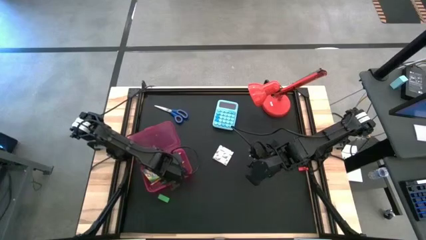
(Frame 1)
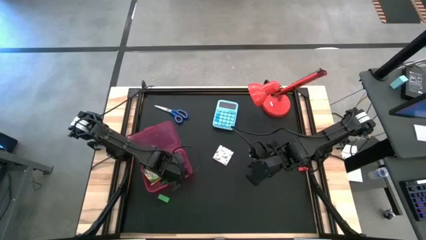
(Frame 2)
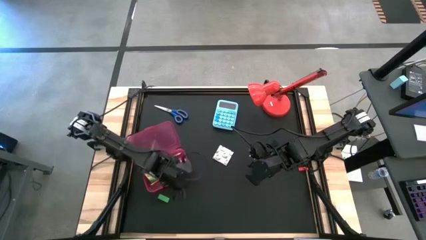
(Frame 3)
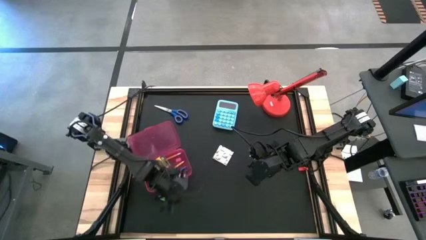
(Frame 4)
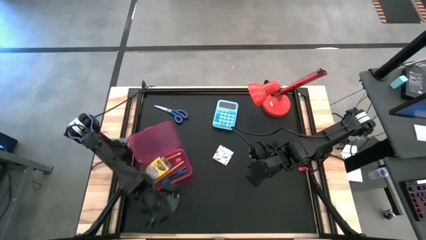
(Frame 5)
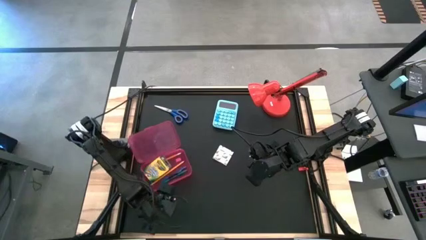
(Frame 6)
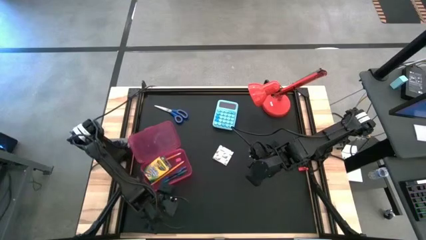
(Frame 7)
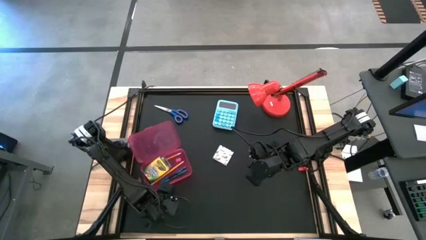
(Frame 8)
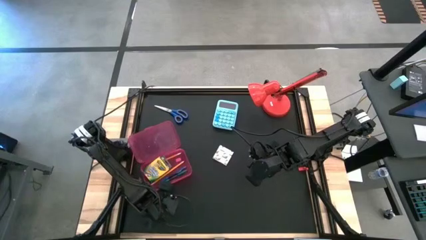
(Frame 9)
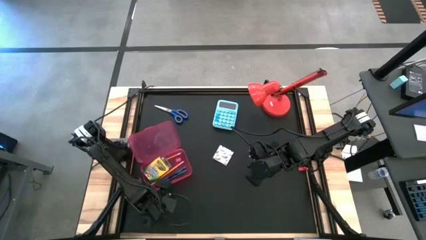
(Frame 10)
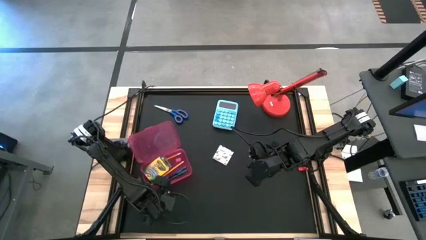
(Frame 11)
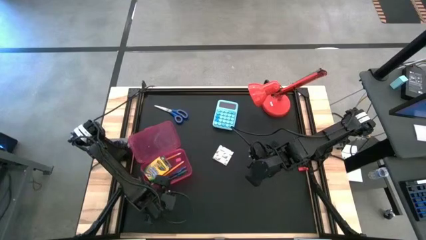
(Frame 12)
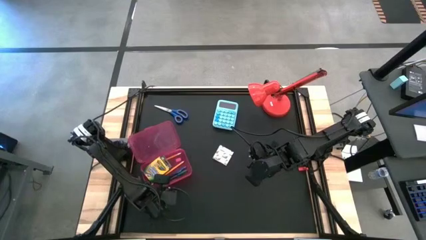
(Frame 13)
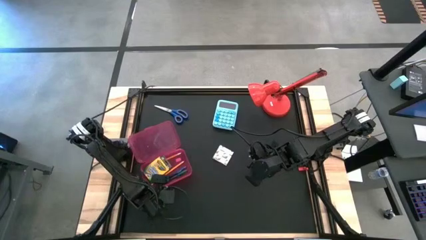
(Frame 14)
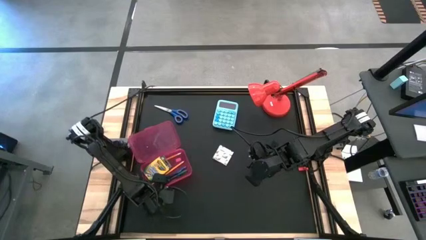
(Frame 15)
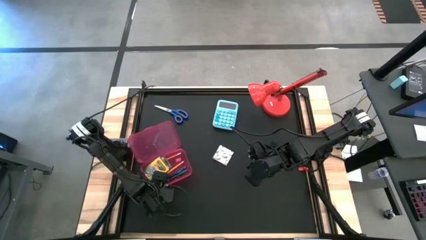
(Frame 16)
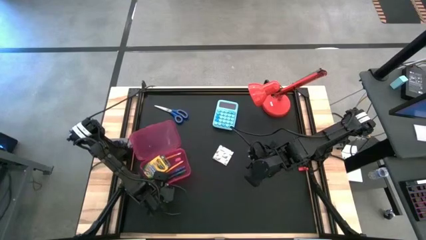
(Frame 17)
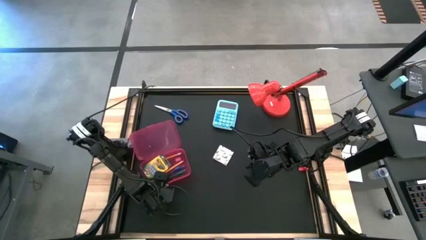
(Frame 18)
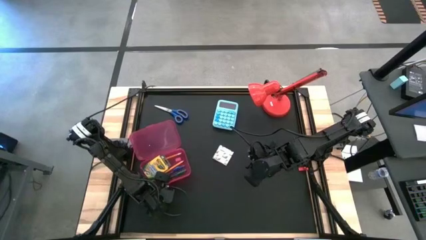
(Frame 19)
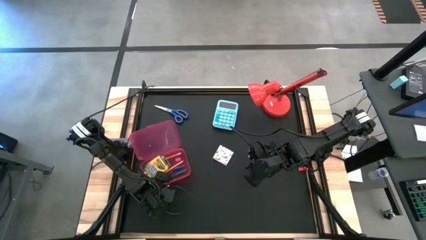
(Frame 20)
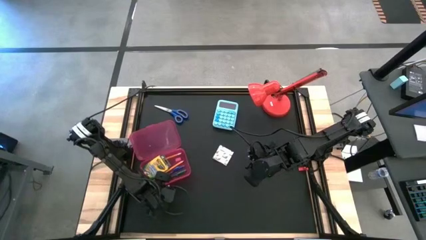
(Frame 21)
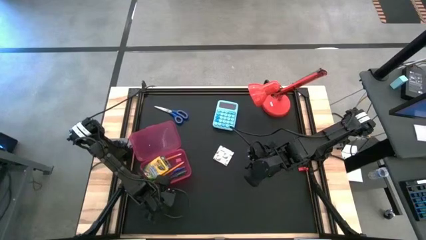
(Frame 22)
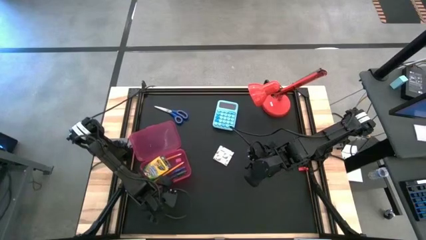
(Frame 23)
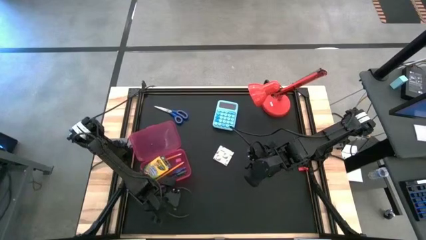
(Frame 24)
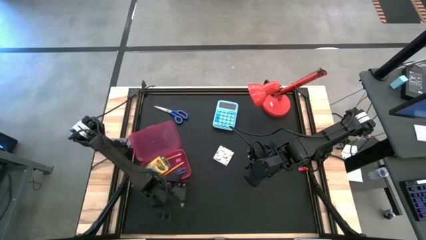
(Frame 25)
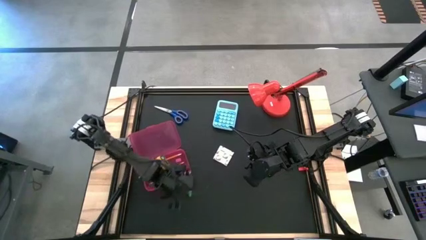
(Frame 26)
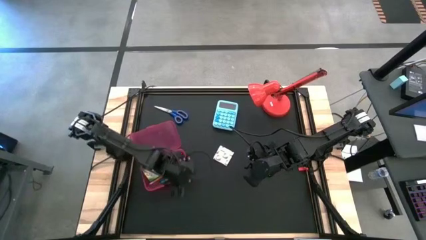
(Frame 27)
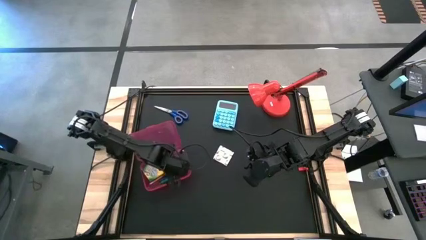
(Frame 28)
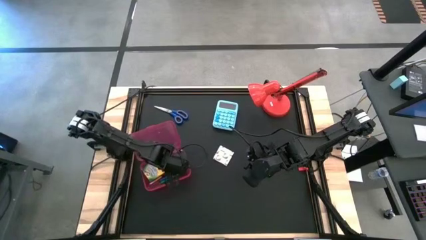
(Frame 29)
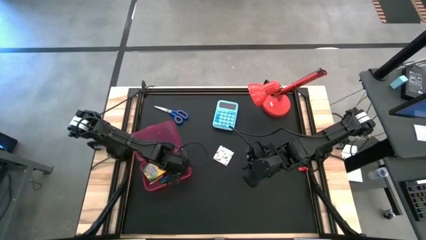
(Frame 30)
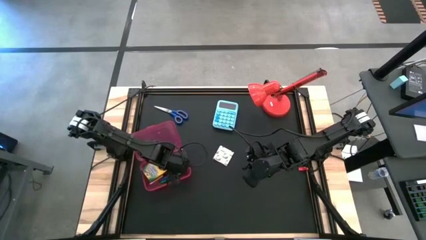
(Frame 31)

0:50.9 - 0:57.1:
Task: Pack school essentials
Put the green eraser into the red supply box

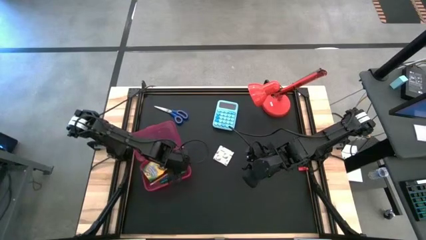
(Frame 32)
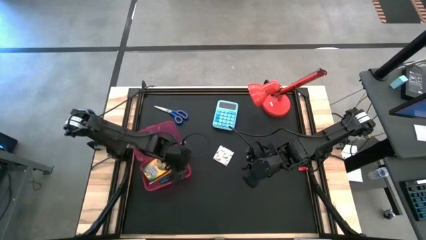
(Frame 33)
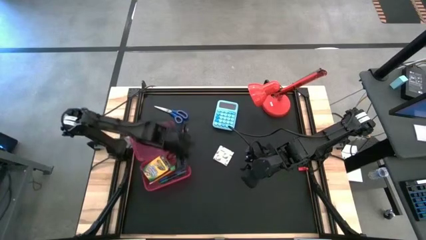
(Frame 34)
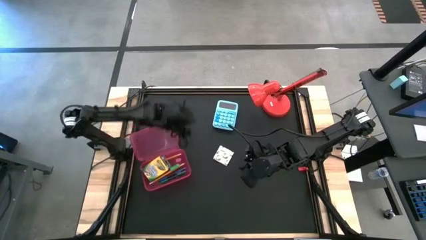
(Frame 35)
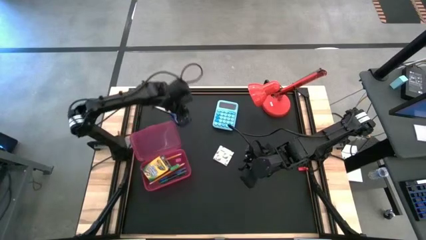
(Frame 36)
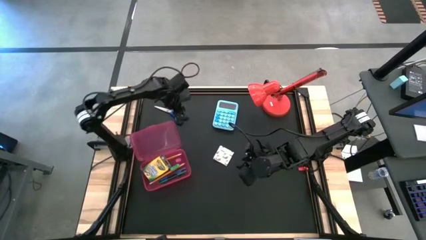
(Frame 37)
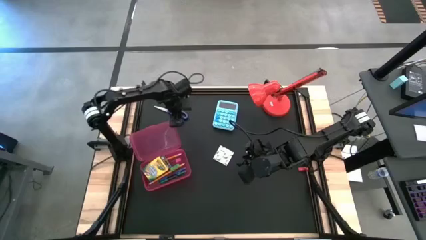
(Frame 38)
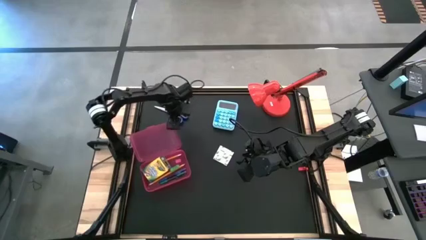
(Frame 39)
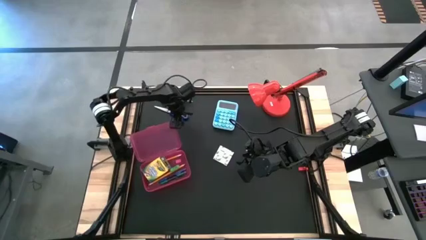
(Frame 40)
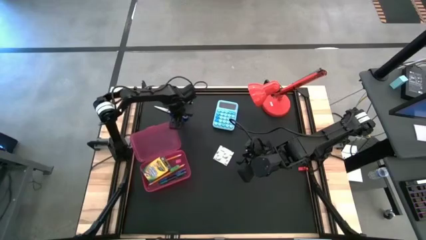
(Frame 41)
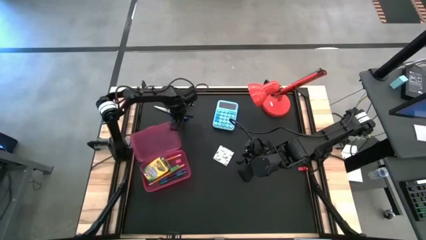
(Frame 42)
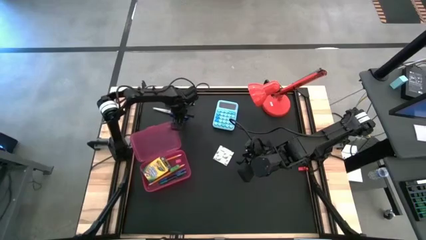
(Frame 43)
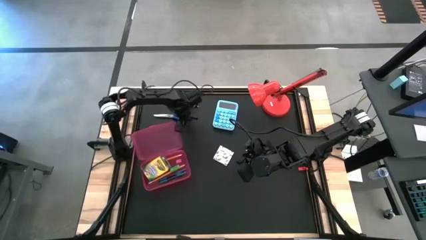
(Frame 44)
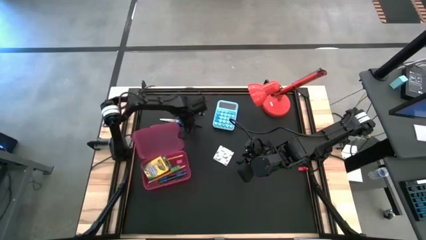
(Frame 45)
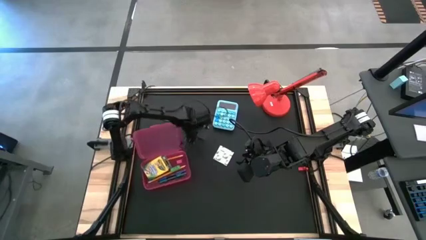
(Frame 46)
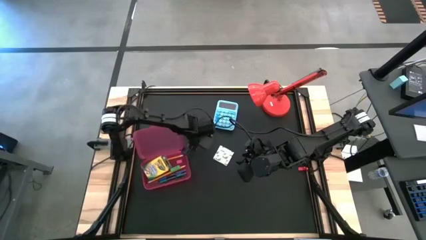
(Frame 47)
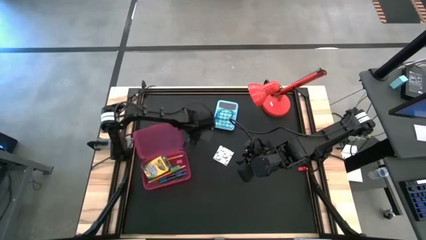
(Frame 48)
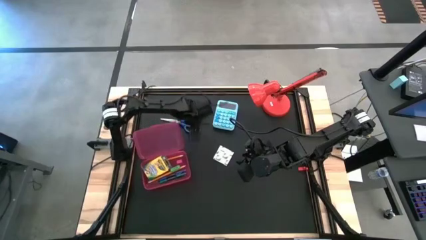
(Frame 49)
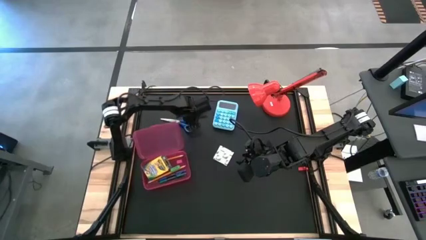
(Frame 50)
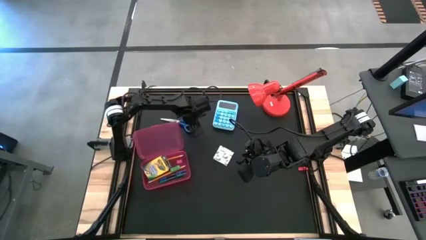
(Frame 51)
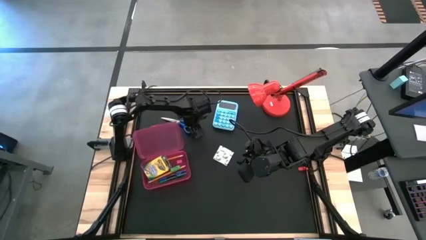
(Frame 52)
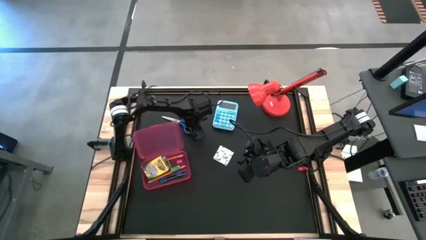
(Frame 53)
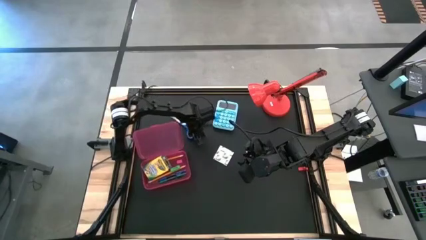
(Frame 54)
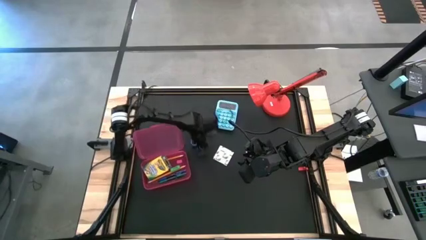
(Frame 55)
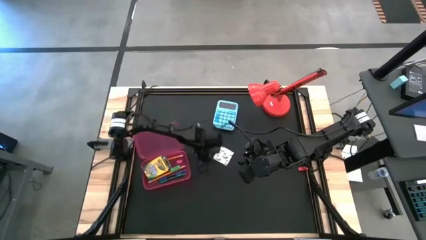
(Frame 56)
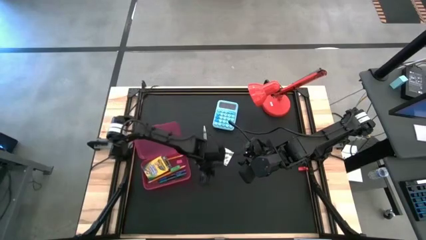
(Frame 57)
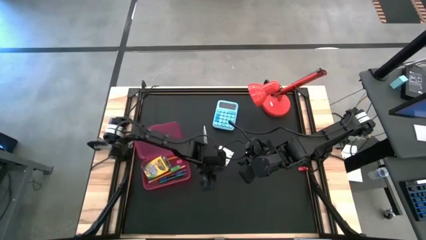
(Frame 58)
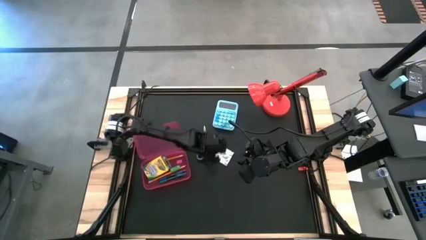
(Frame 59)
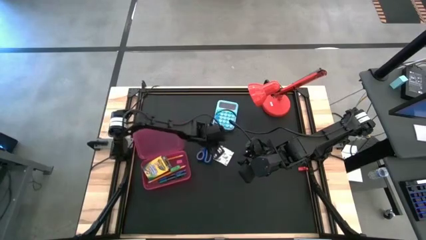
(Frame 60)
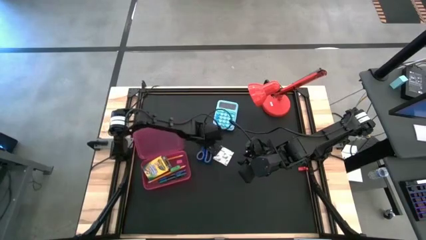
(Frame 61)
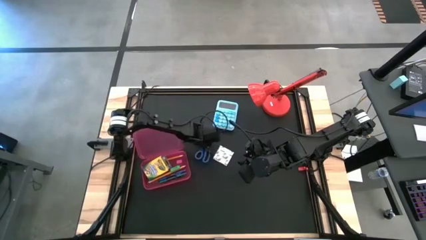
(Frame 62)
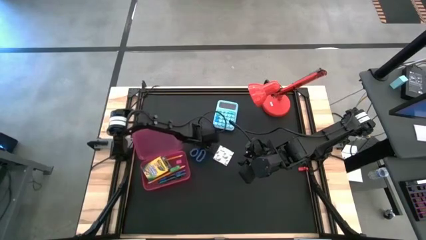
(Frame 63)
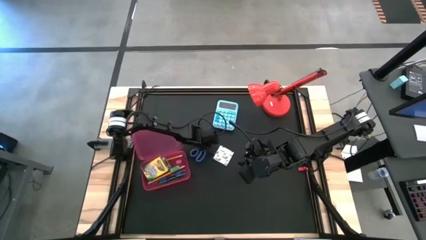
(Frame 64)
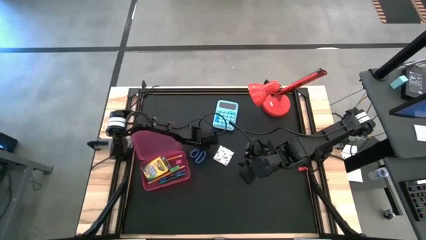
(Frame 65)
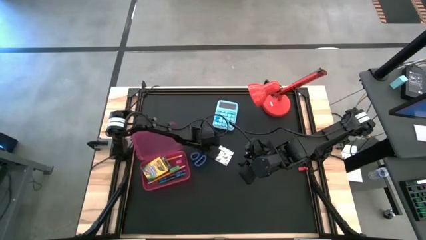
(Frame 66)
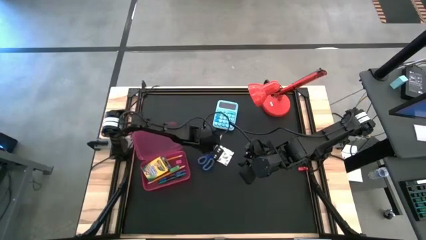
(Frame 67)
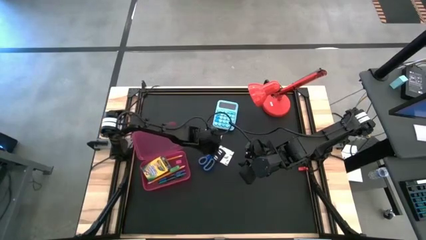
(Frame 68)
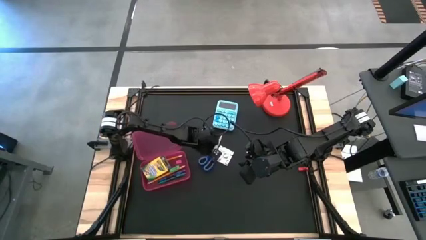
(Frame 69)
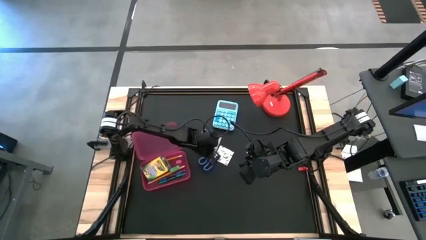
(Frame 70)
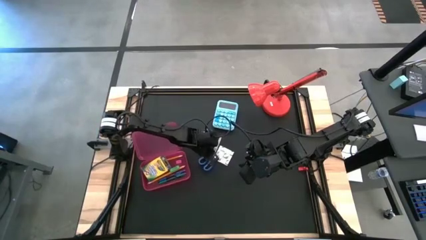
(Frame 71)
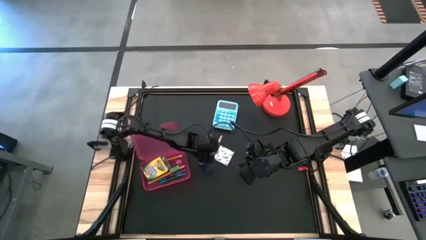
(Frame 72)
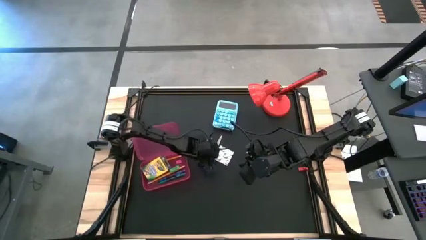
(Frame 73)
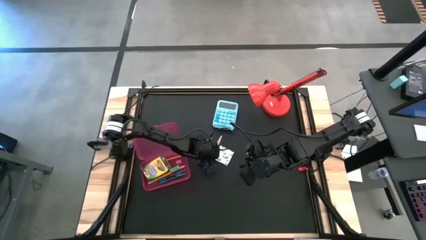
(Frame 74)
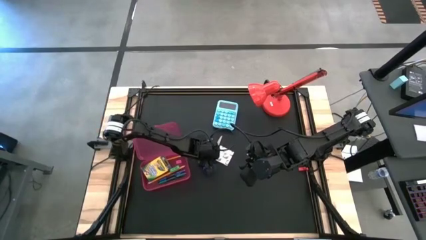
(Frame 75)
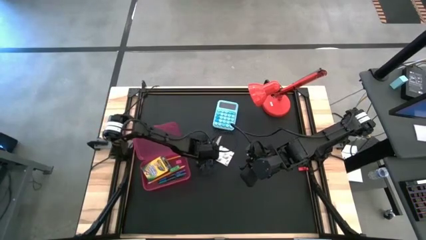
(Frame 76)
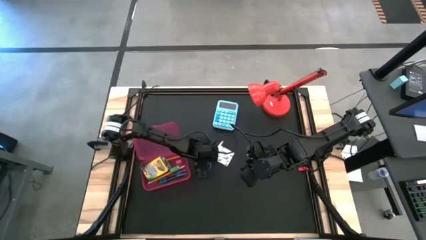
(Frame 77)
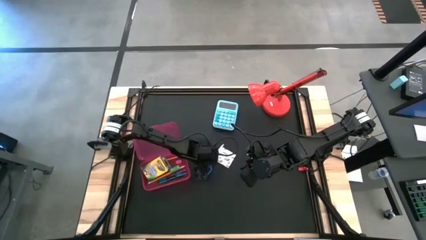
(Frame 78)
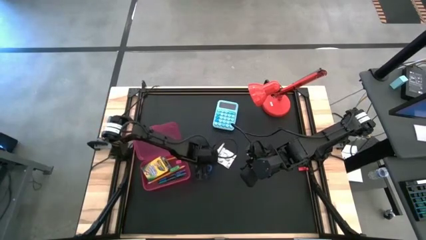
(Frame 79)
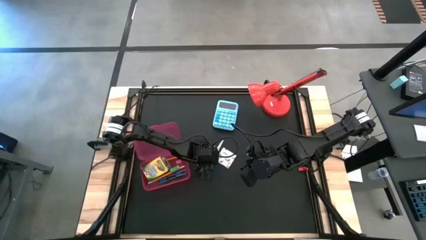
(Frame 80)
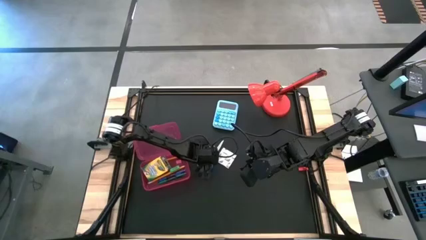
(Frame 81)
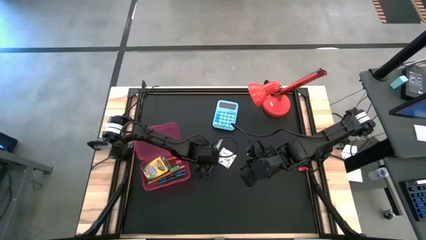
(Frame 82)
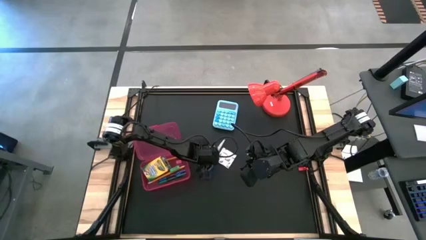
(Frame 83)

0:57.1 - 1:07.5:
Put the blue scissors into the red supply box
